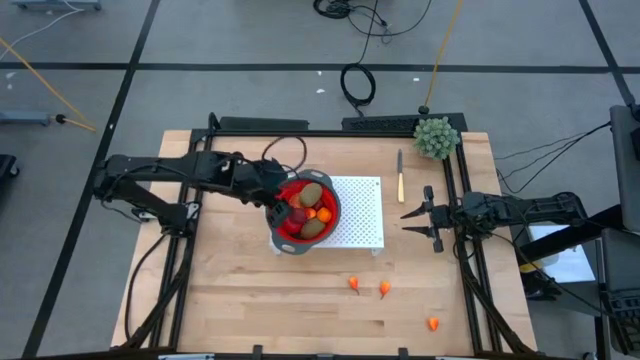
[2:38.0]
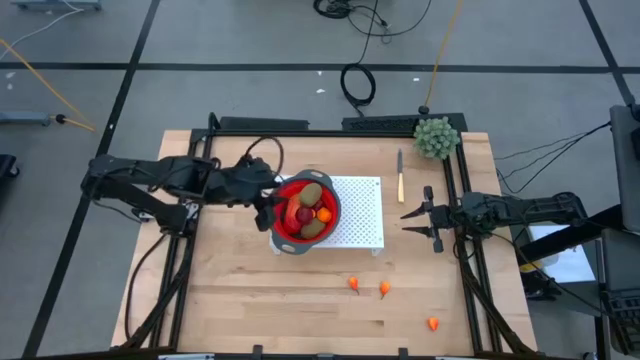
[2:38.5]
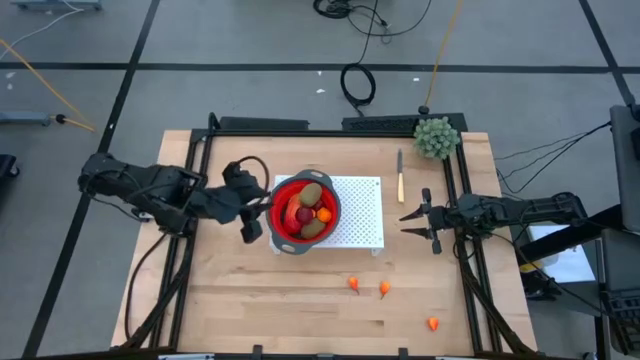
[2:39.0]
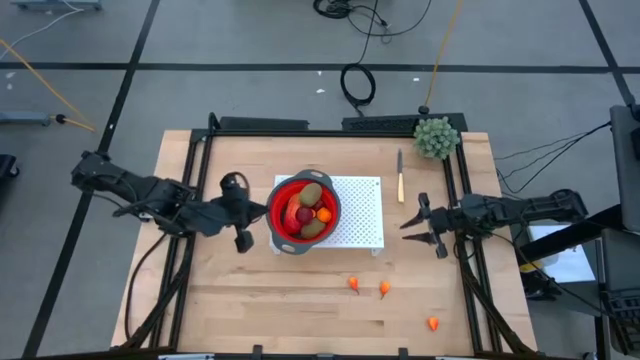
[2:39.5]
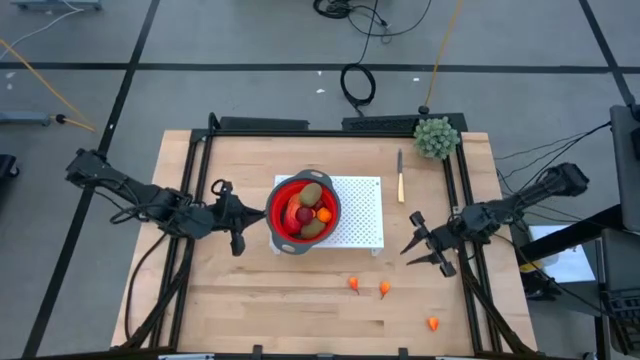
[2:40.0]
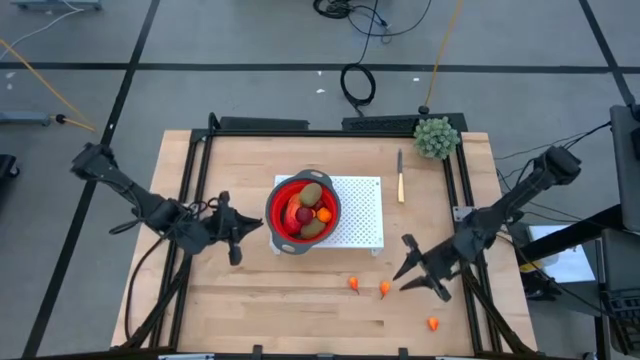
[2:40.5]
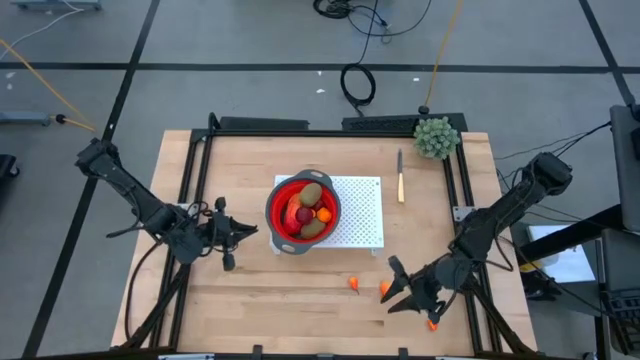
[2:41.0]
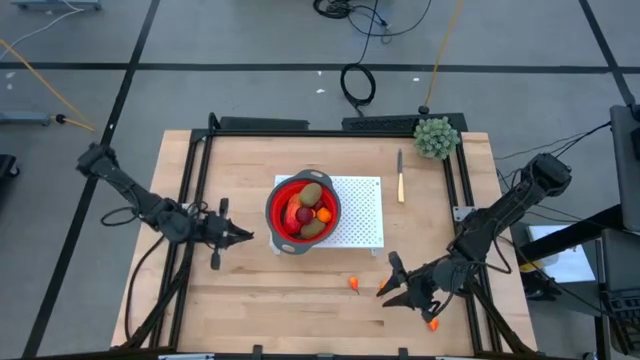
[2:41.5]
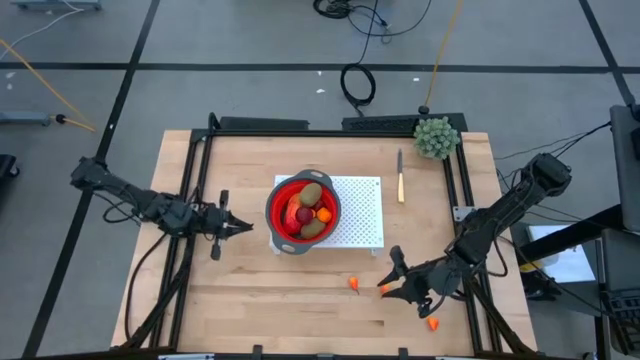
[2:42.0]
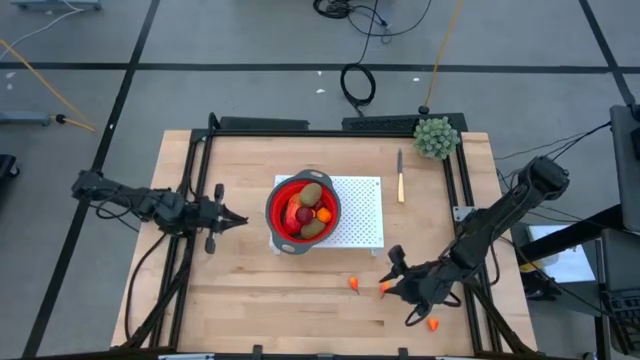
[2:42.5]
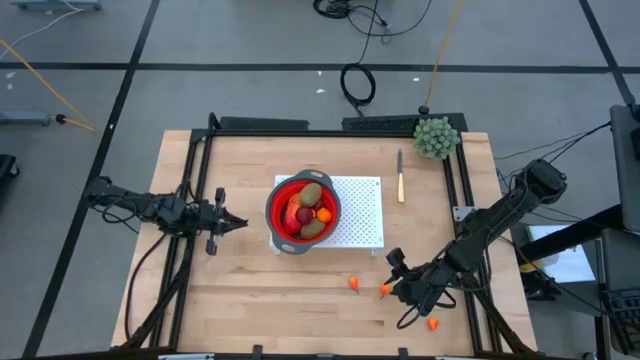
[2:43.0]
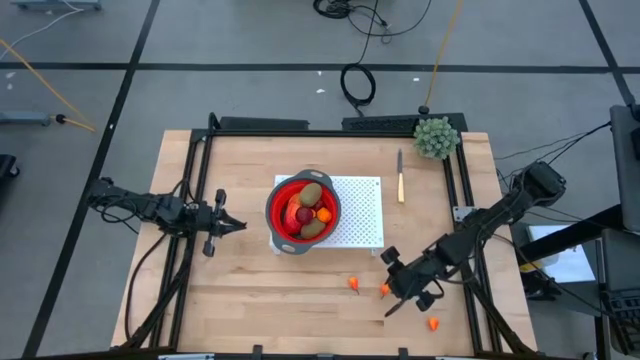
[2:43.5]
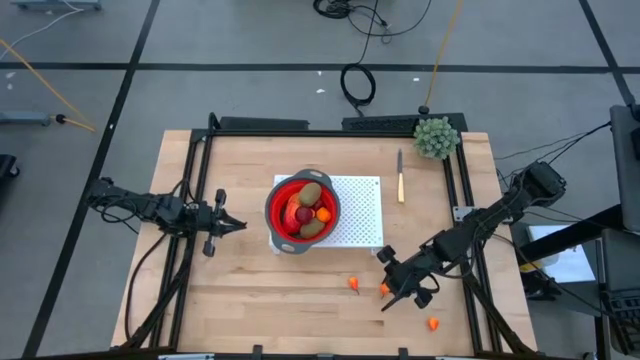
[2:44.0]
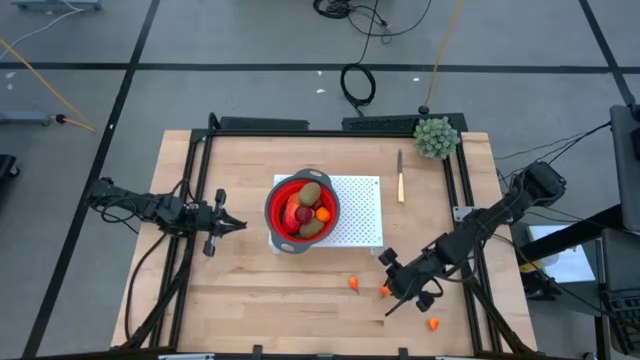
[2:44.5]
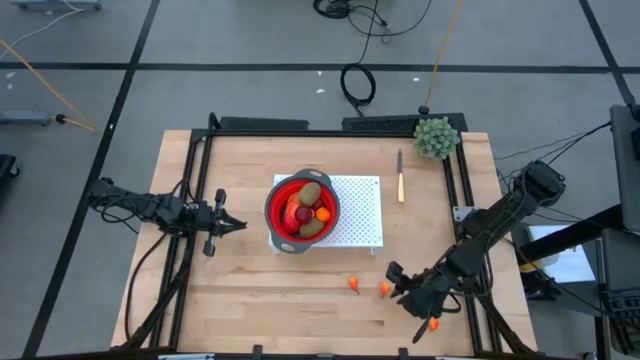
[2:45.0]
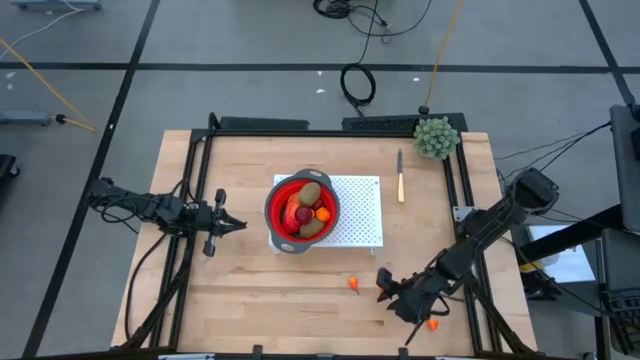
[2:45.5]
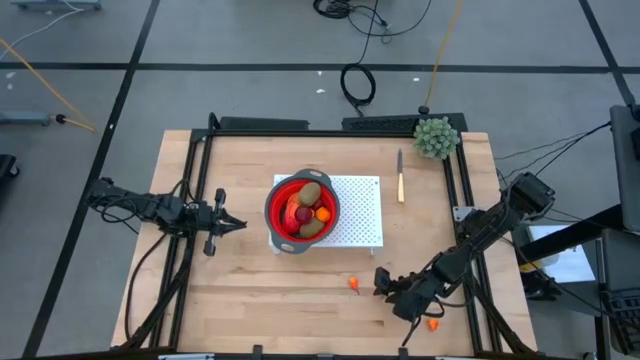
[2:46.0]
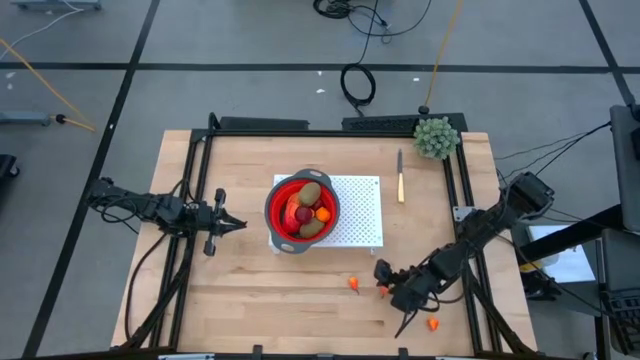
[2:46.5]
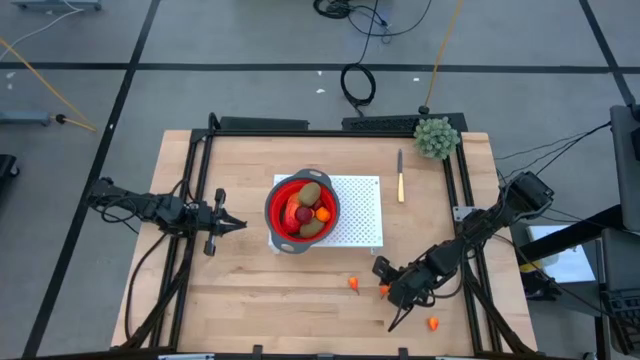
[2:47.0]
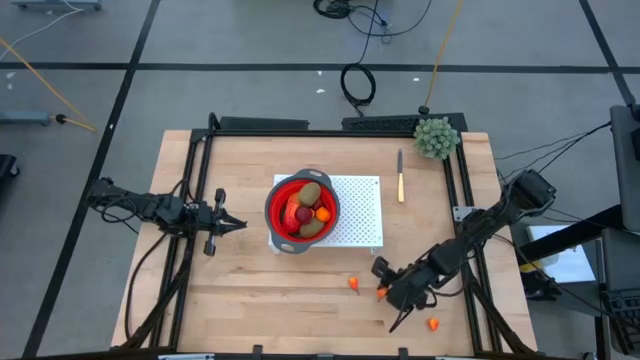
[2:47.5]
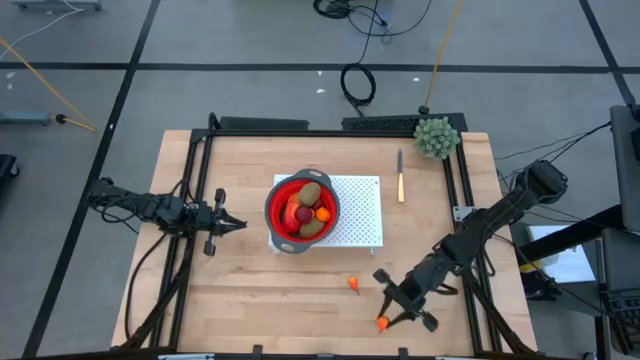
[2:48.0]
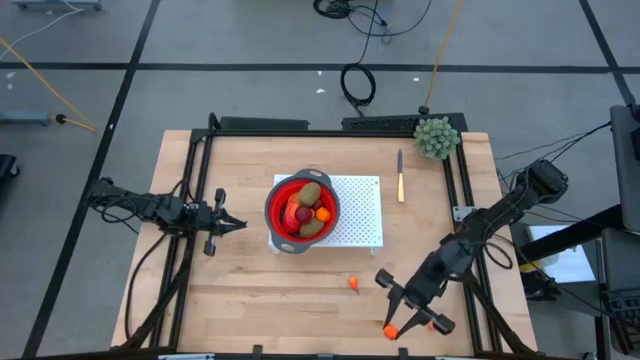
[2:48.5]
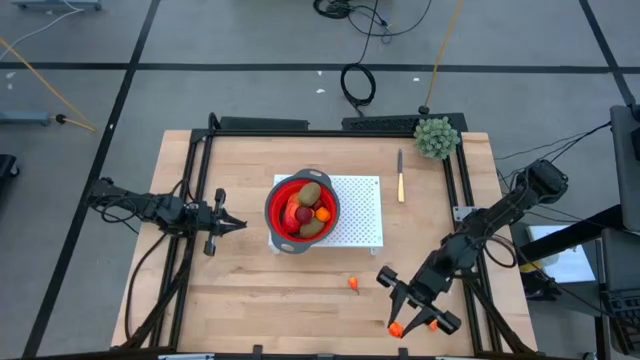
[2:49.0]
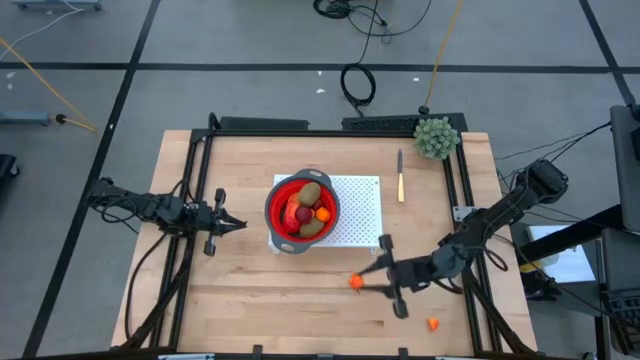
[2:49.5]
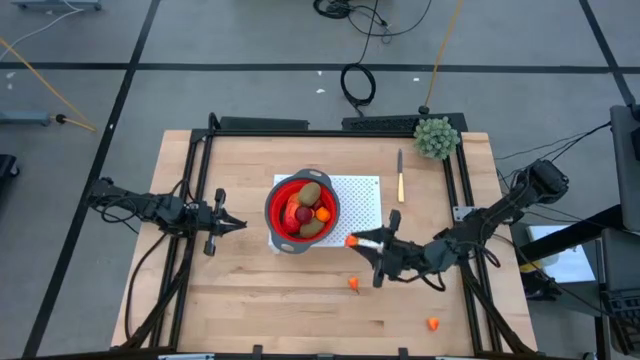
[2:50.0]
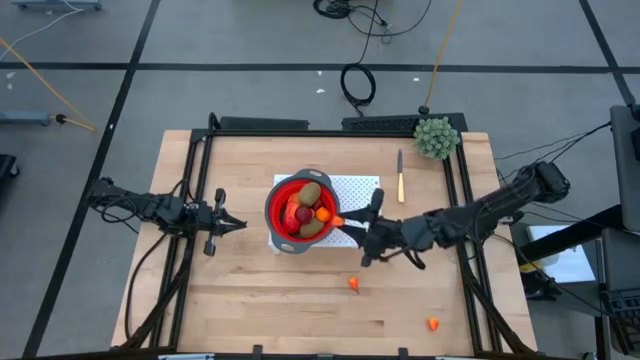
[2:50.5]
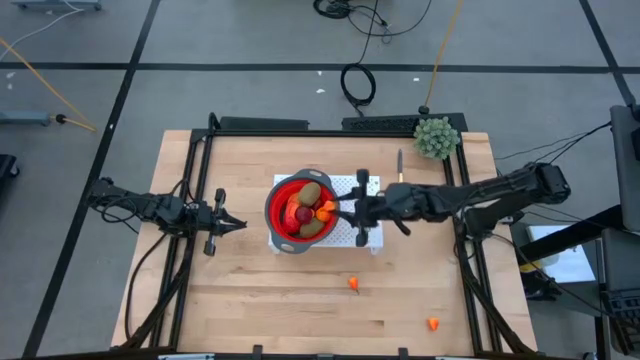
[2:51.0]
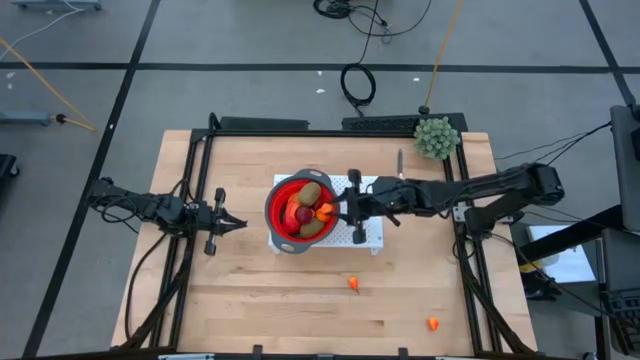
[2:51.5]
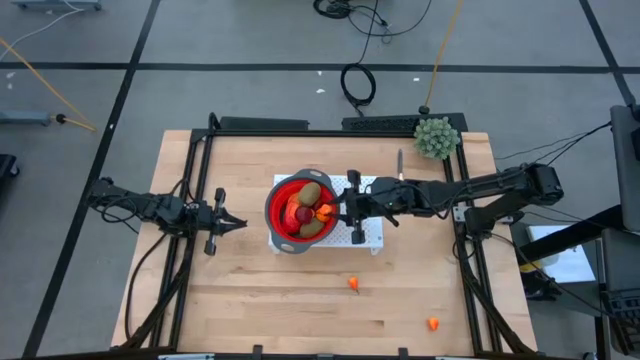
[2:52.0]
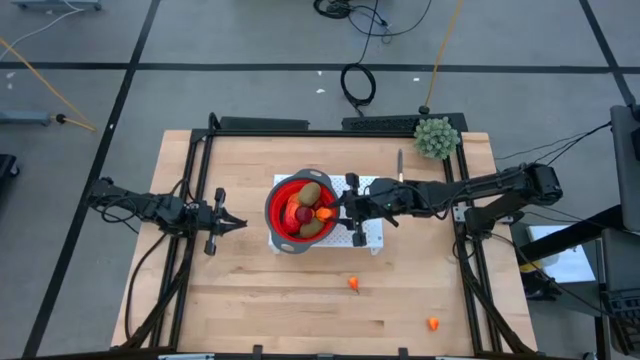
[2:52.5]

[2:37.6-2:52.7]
Task: Pick & Place Fruit
Put the middle peach into the strainer bowl on the shelf

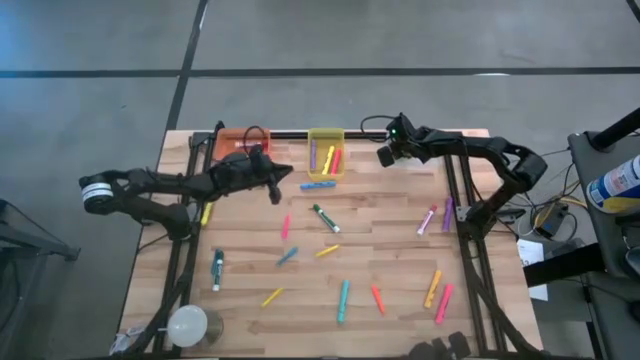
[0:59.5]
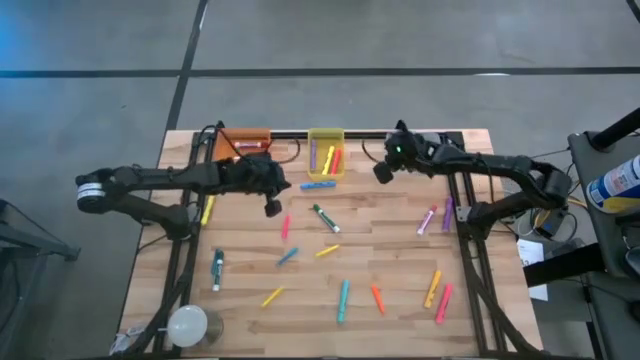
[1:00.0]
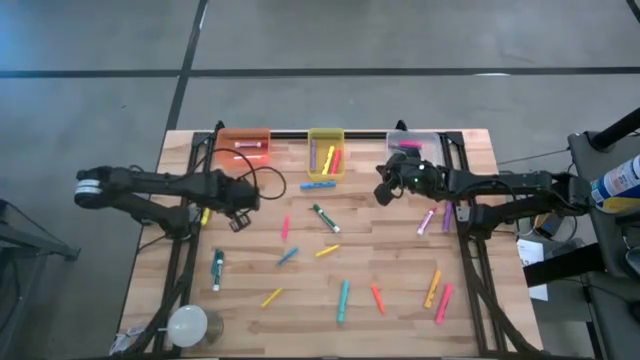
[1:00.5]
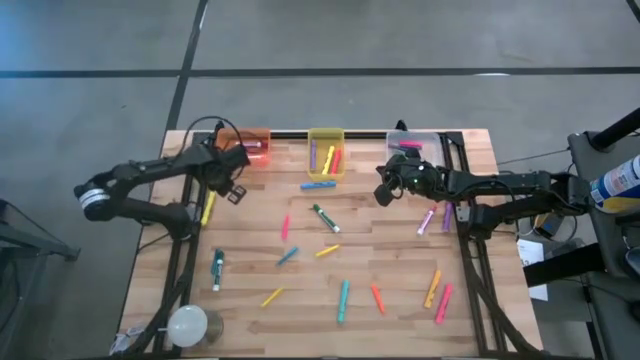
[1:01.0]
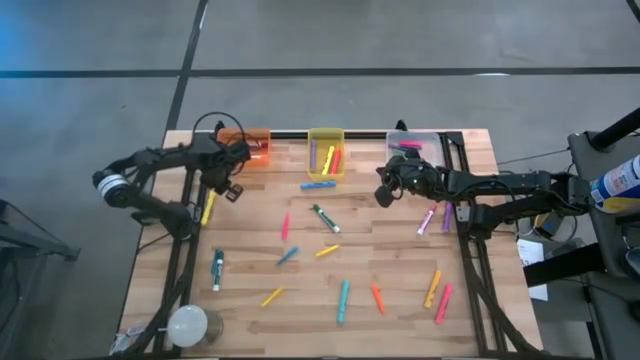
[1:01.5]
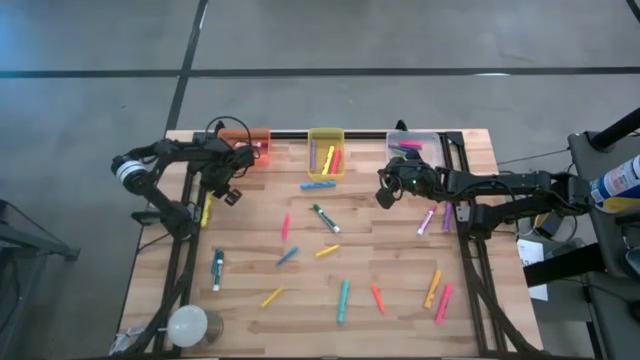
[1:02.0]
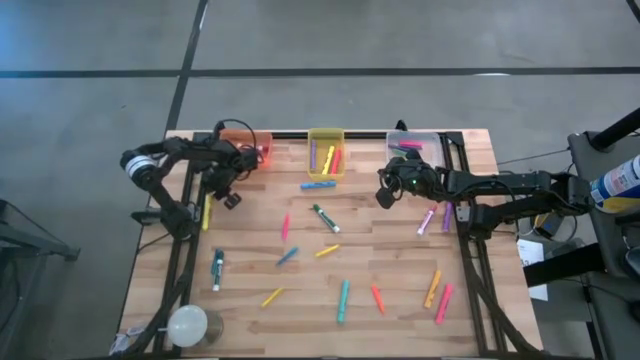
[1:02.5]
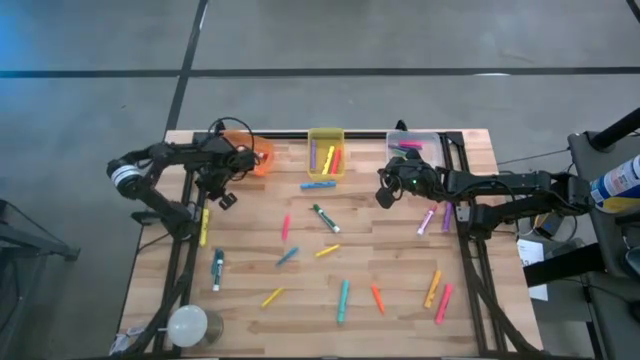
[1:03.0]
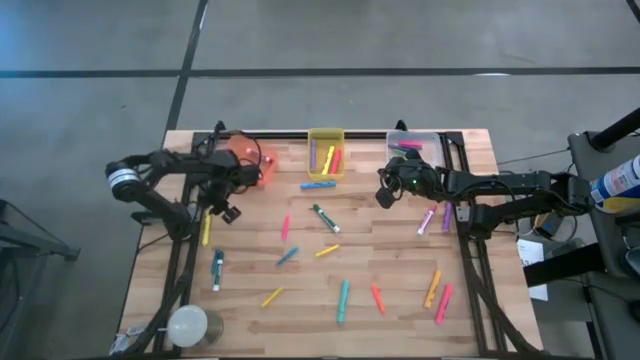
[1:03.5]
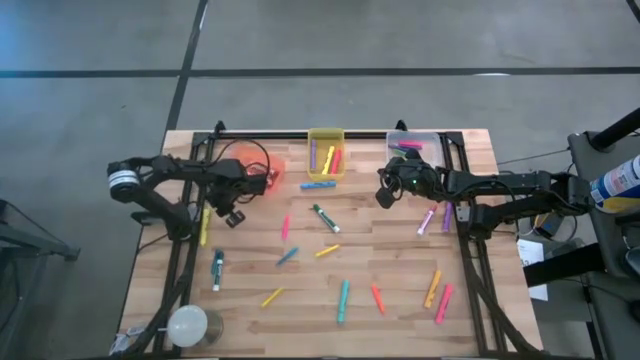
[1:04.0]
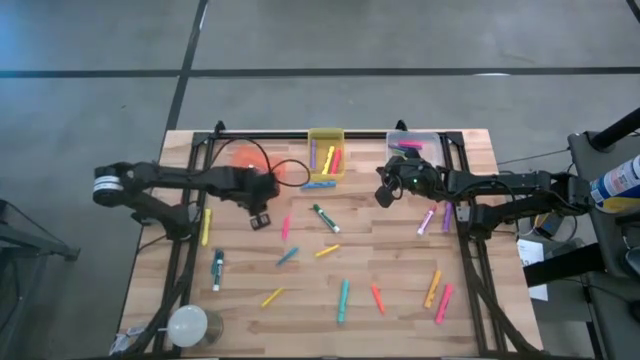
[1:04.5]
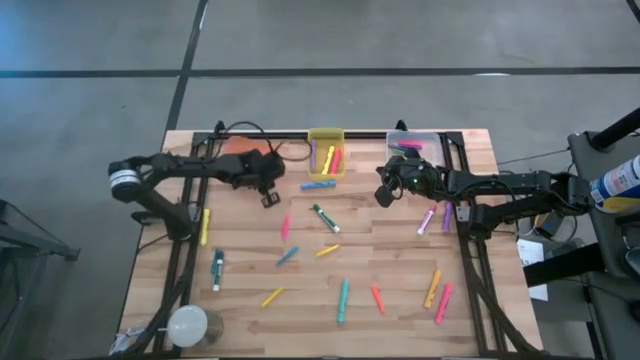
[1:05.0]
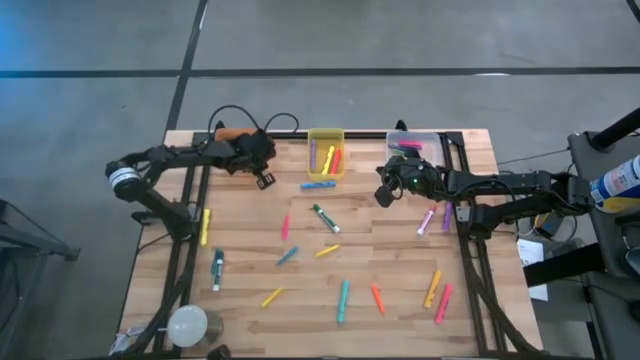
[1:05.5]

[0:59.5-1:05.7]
Task: Pick & Place Markers
Adjust the orange bin
